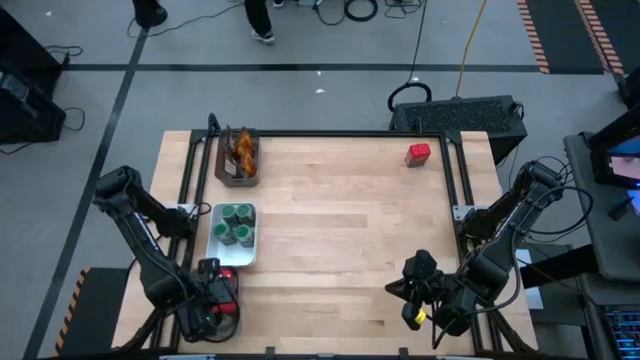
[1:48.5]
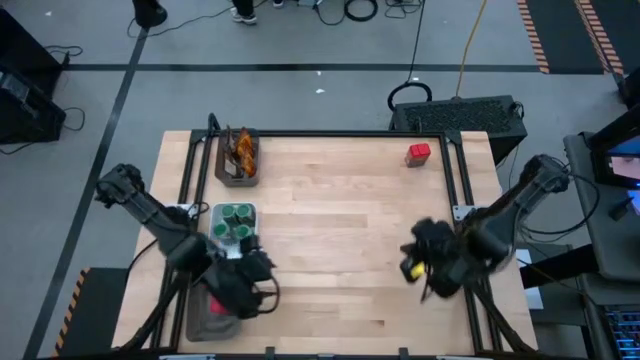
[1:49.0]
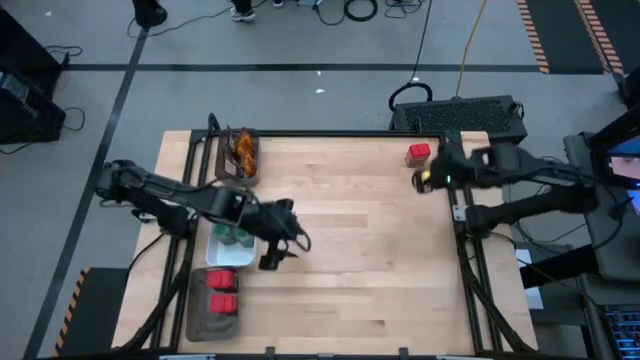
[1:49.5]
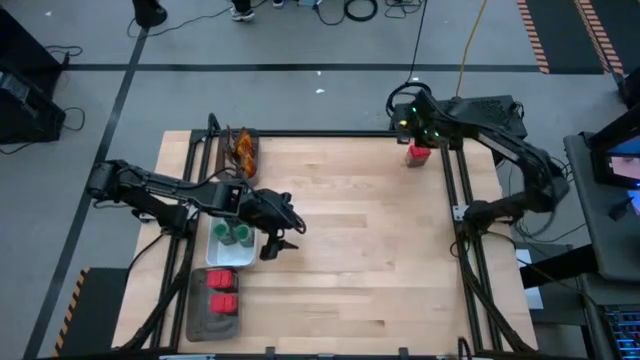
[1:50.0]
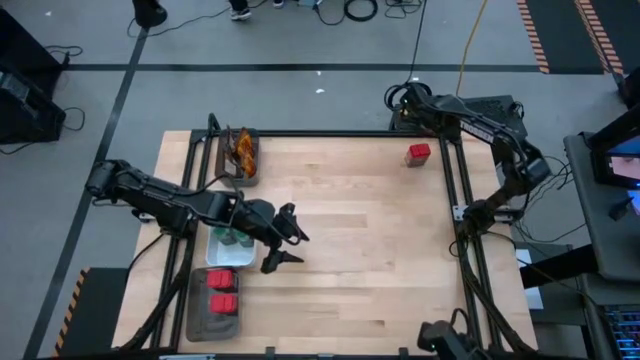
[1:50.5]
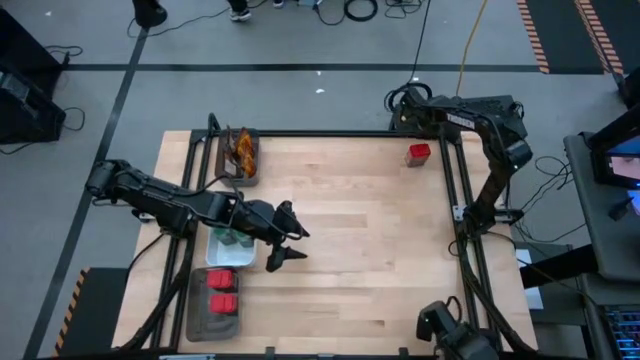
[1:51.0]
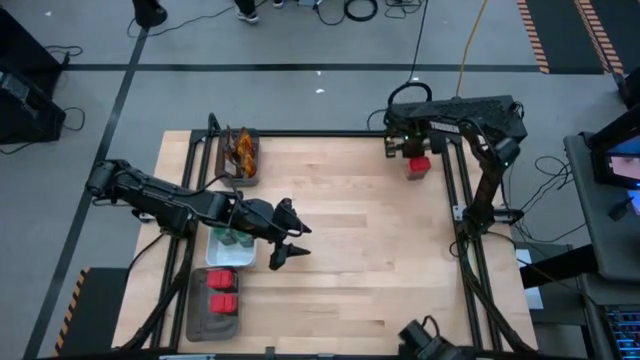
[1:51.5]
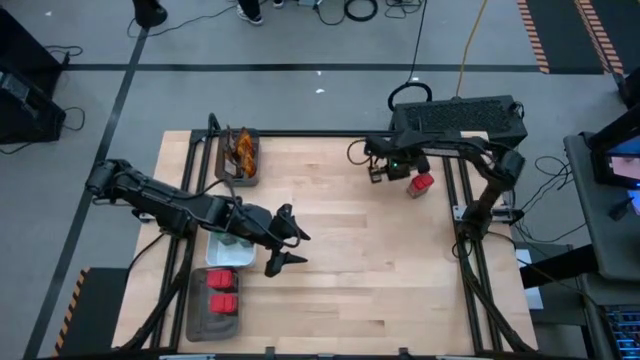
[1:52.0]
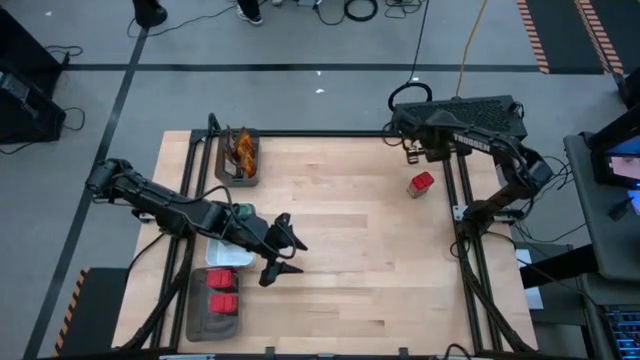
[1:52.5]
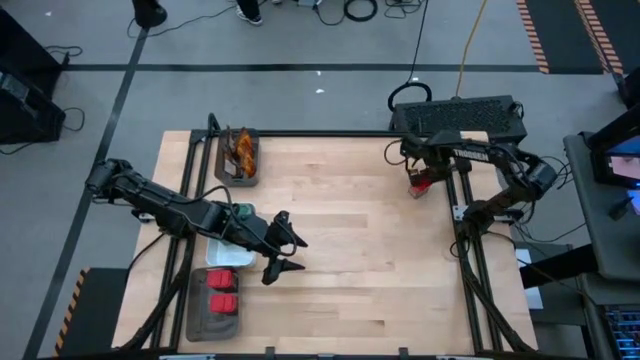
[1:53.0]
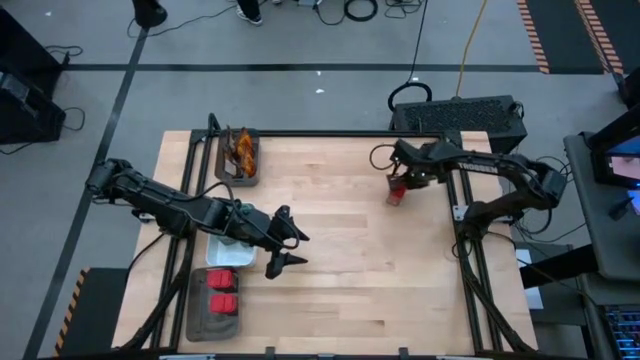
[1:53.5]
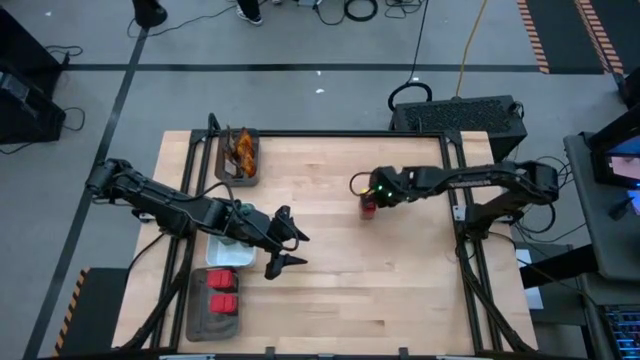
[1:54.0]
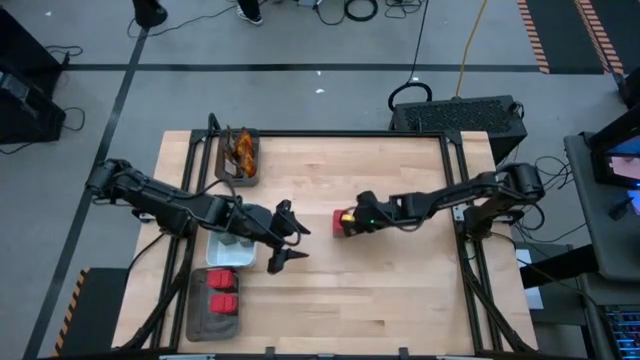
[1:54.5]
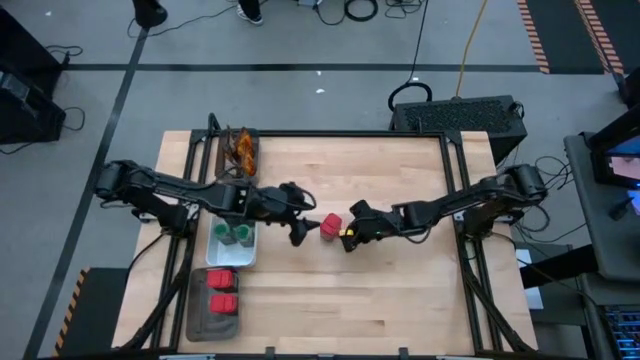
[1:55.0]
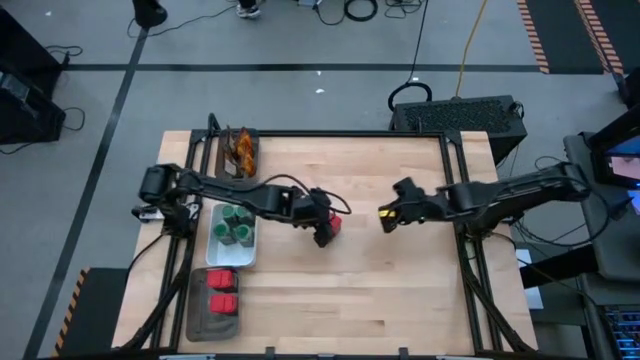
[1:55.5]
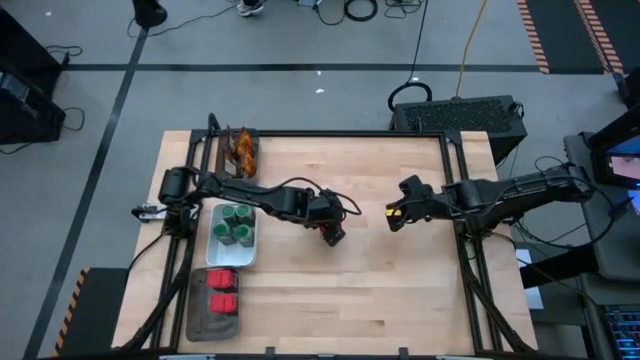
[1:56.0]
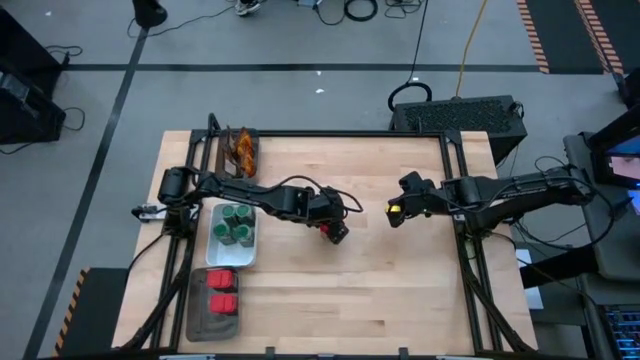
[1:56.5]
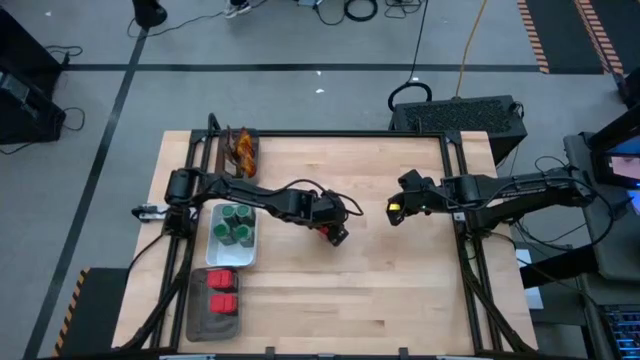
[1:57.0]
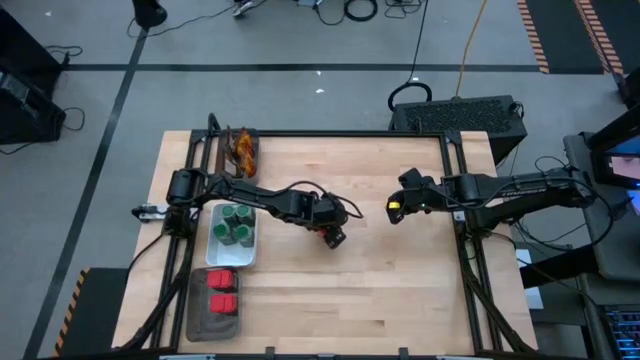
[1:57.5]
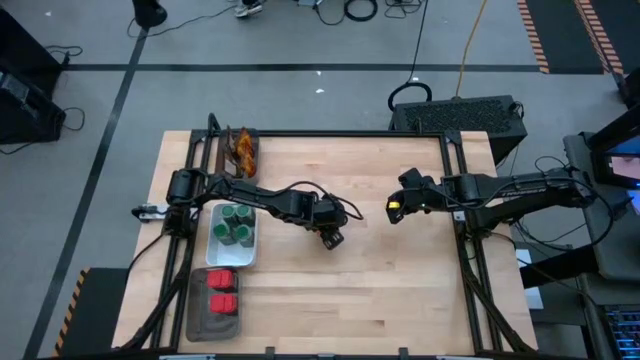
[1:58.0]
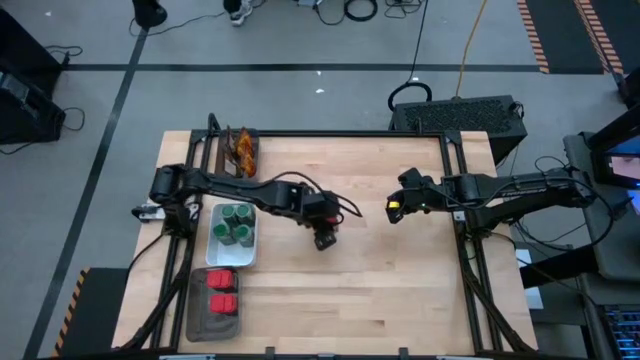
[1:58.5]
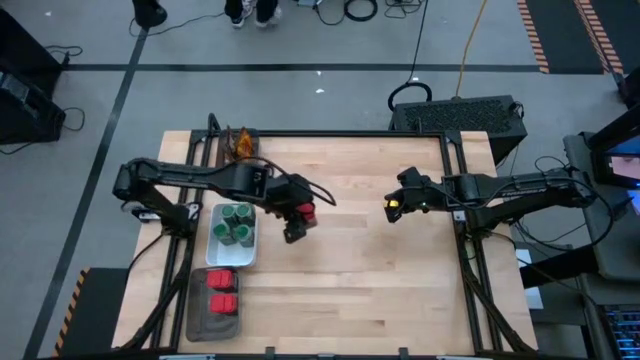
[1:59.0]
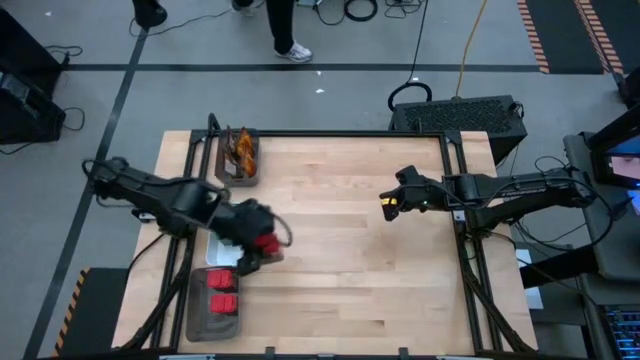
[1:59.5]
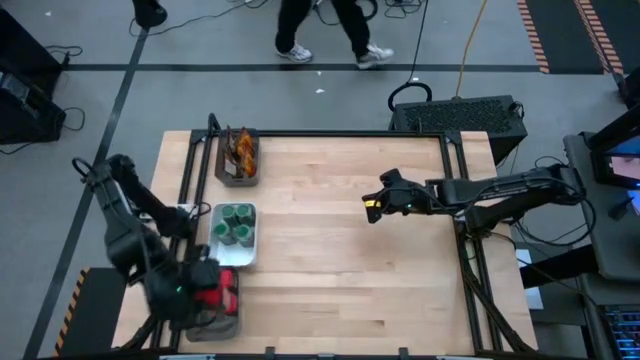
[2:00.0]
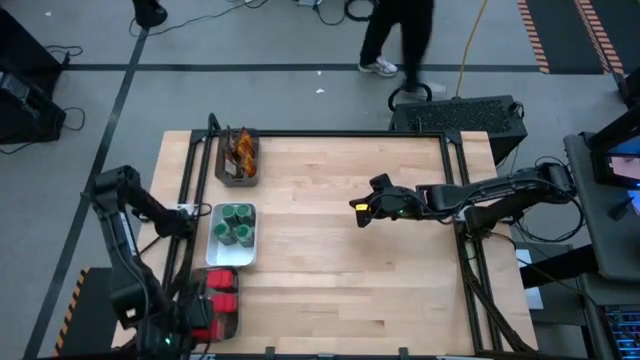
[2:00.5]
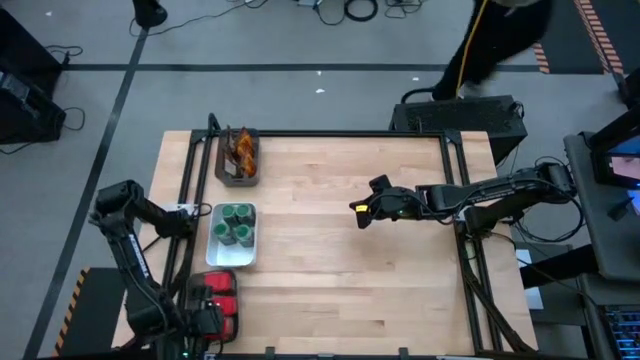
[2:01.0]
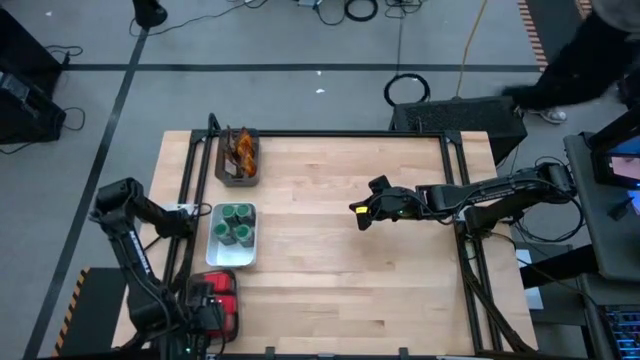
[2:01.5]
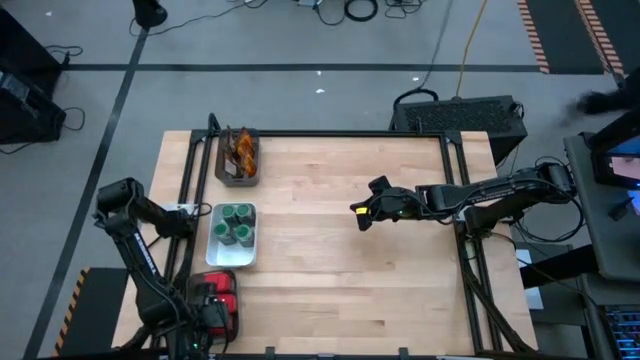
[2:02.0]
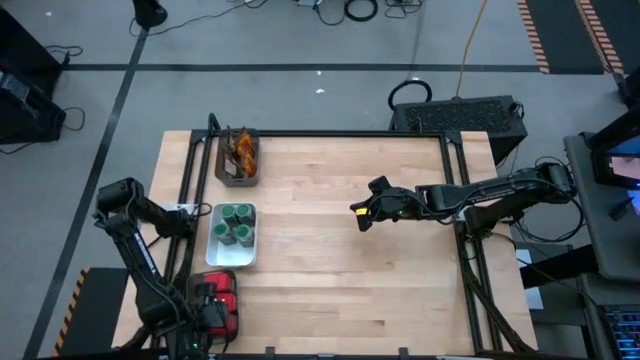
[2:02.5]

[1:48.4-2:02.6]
Task: Sort spices by type
Put the red seasoning can into the bottom left black bin

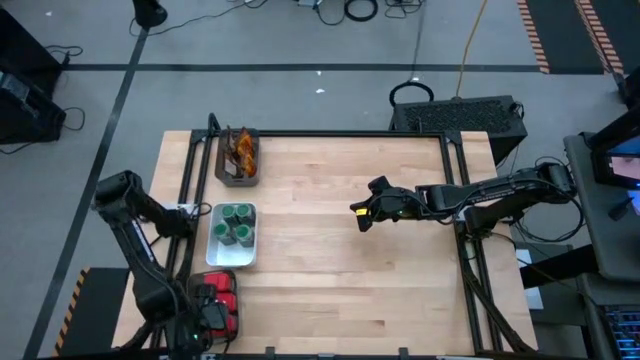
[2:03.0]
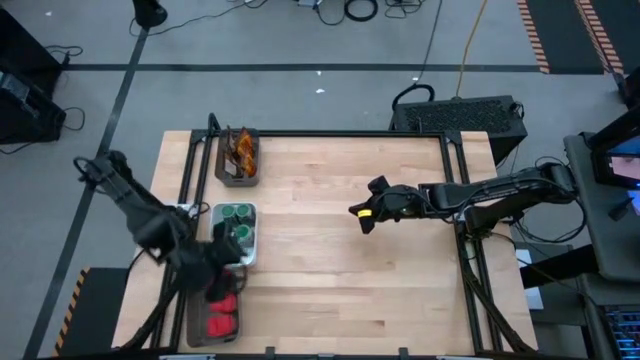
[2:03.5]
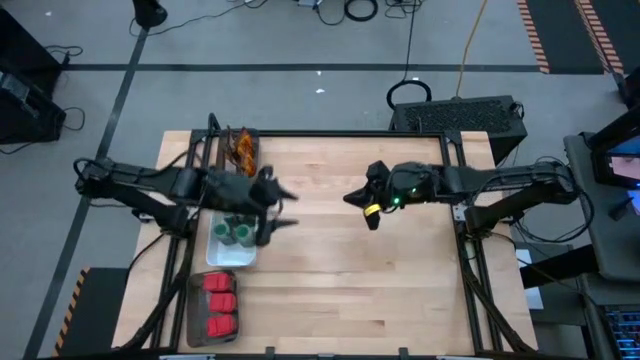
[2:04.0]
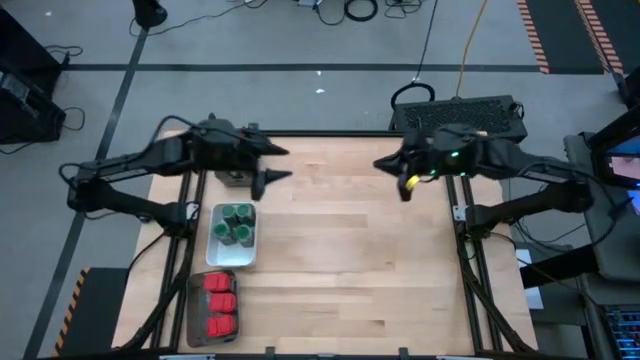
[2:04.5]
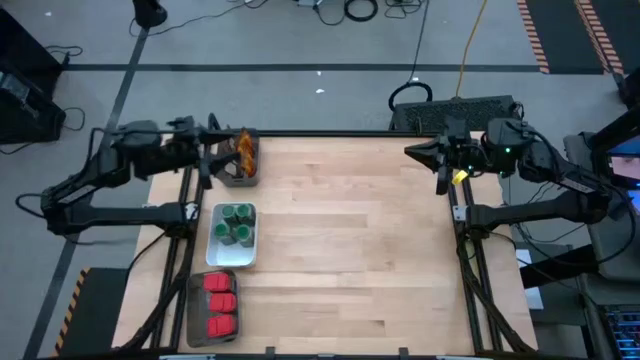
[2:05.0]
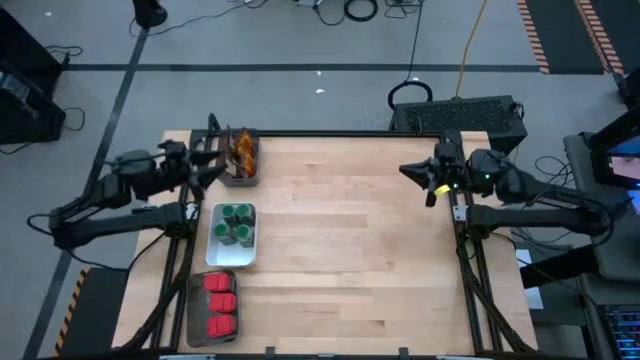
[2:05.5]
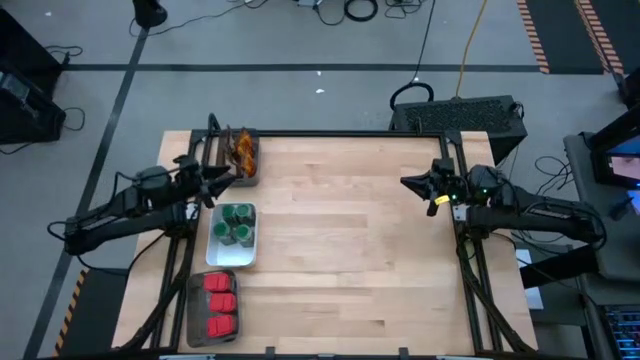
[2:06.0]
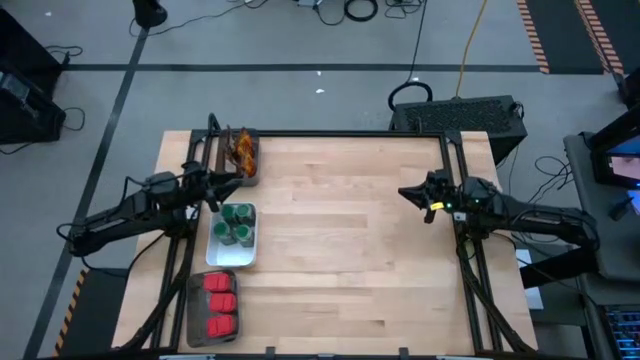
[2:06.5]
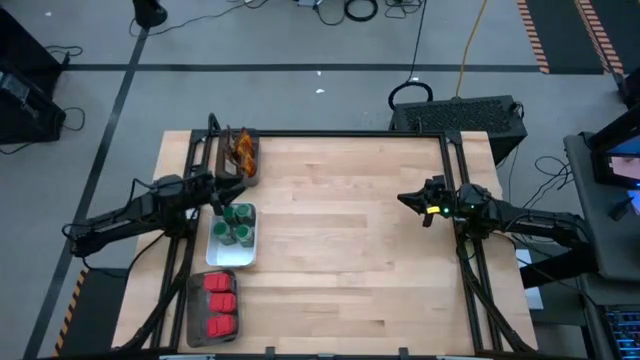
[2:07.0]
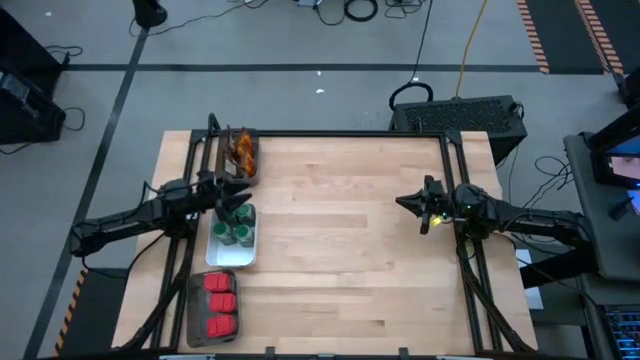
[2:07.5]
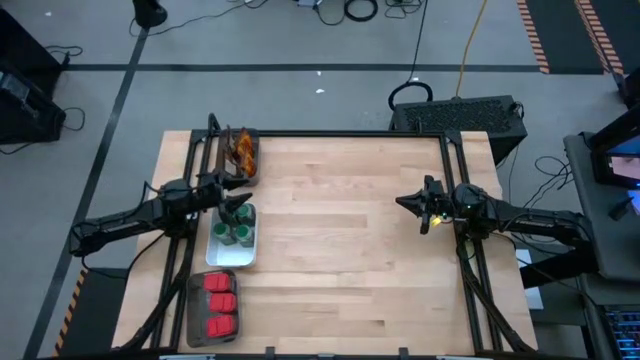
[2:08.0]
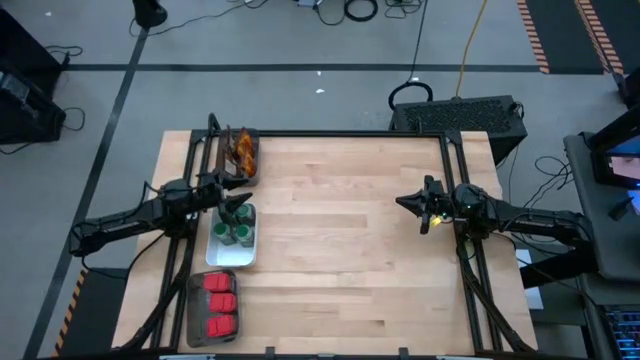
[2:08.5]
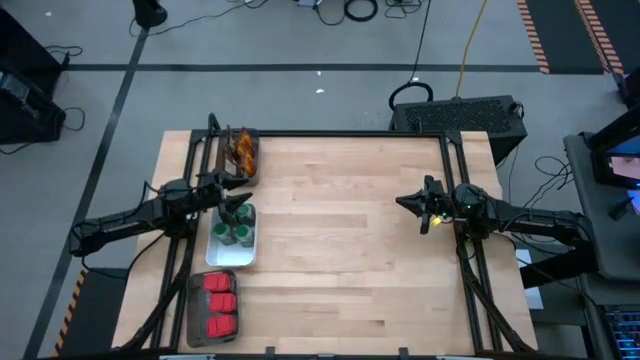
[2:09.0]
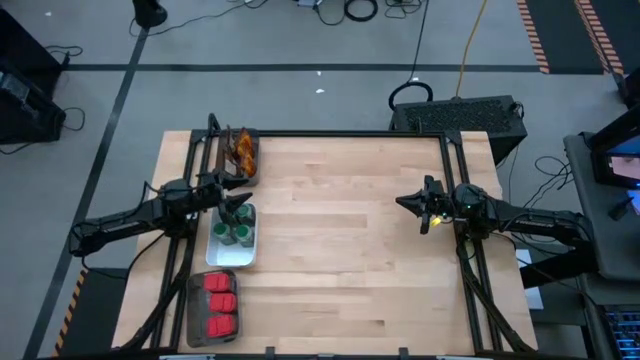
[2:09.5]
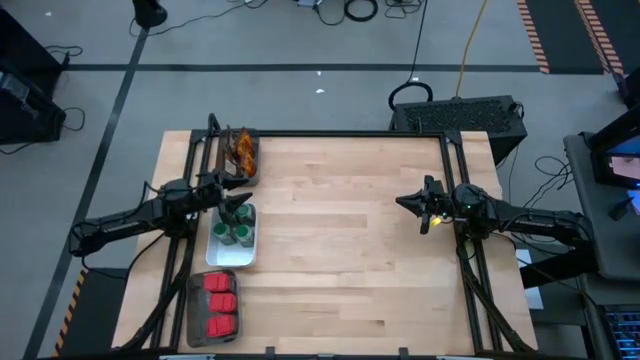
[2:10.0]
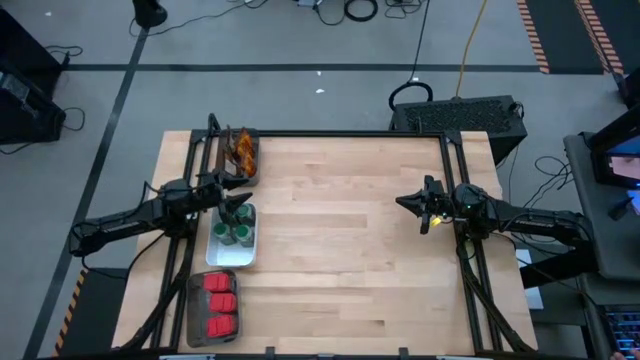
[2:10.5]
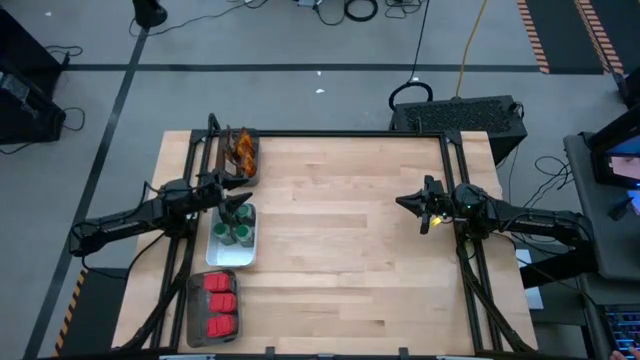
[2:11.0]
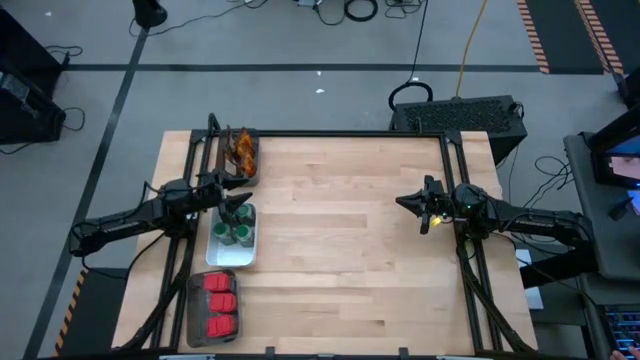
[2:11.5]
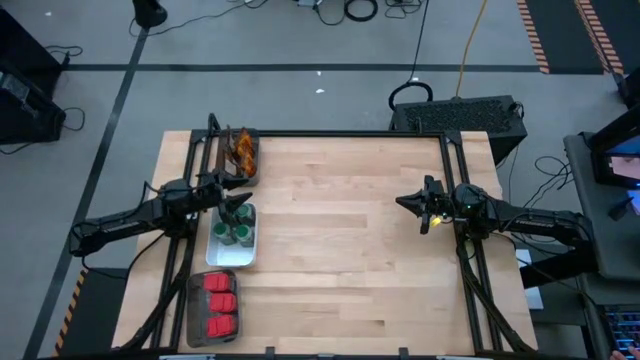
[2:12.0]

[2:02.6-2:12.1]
Return to Home Position
